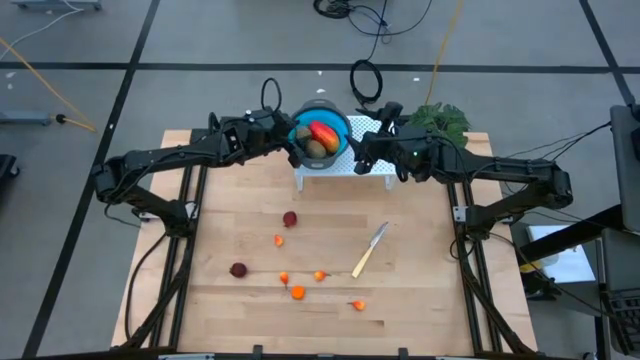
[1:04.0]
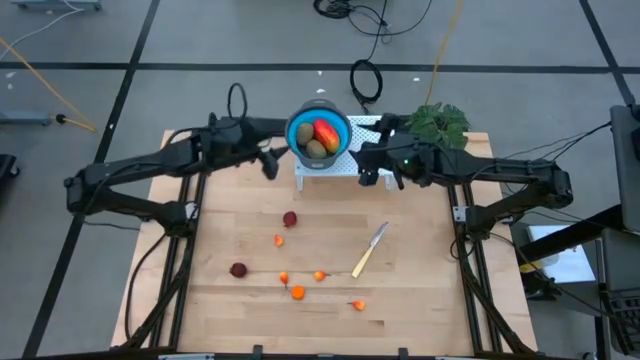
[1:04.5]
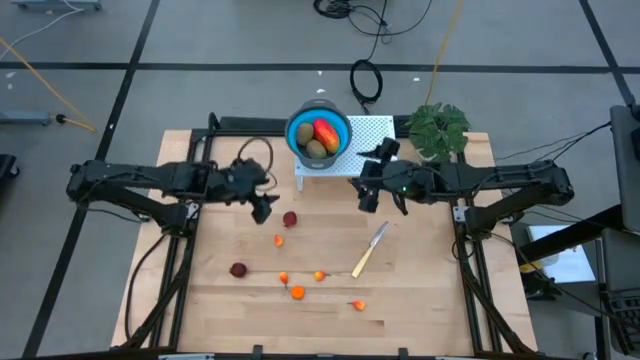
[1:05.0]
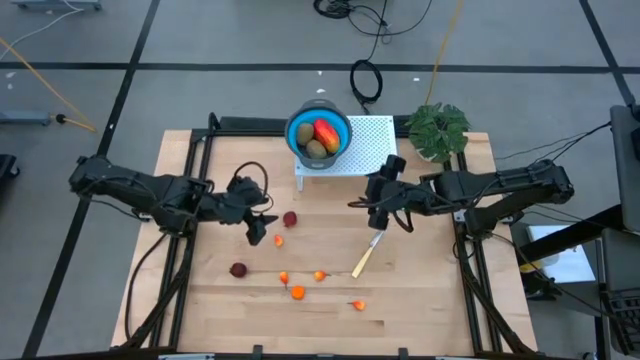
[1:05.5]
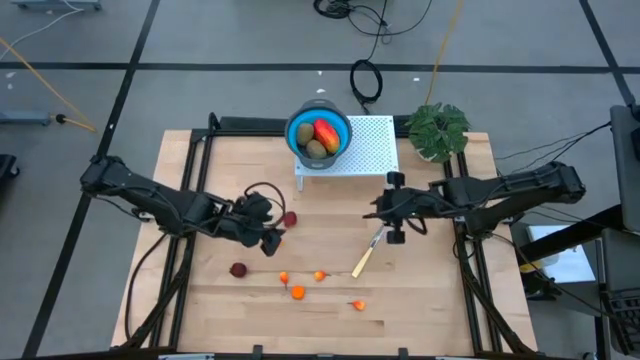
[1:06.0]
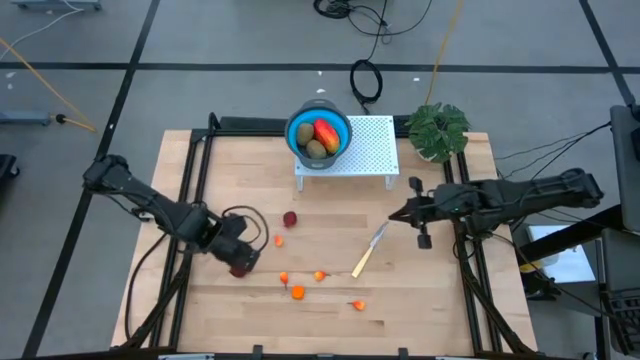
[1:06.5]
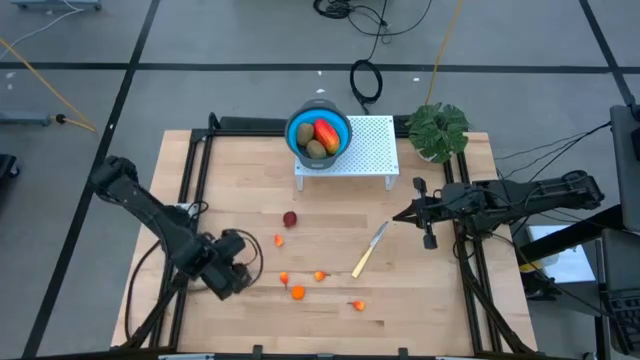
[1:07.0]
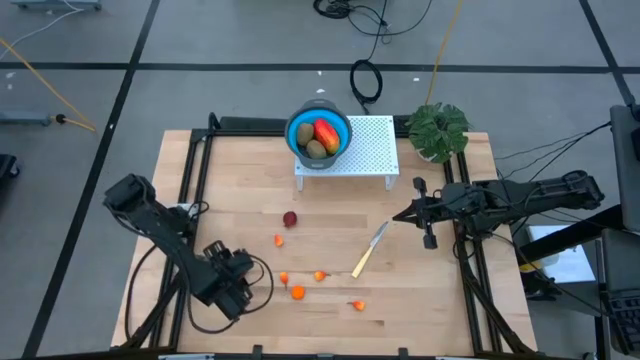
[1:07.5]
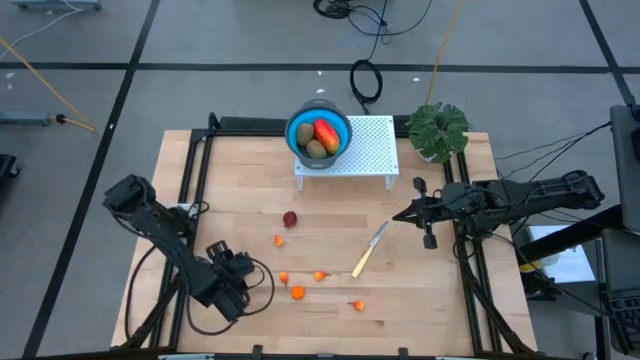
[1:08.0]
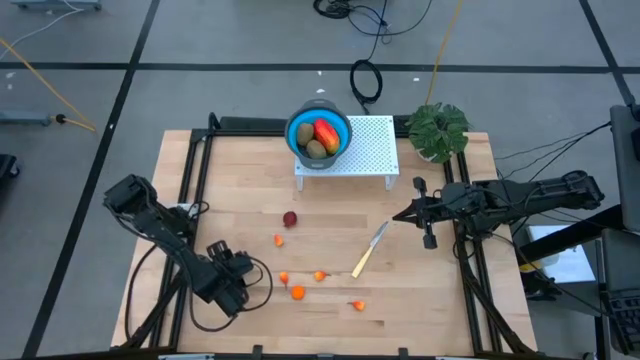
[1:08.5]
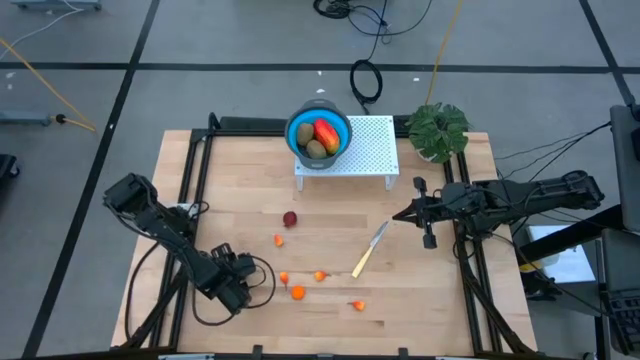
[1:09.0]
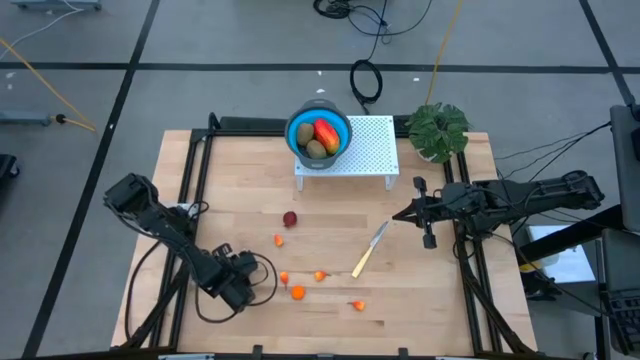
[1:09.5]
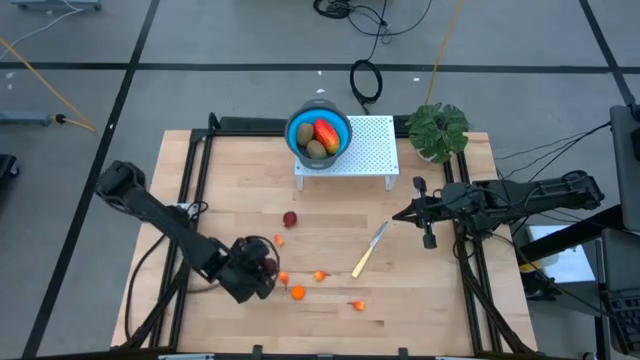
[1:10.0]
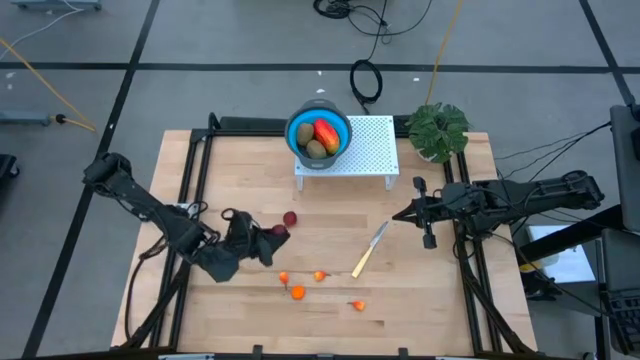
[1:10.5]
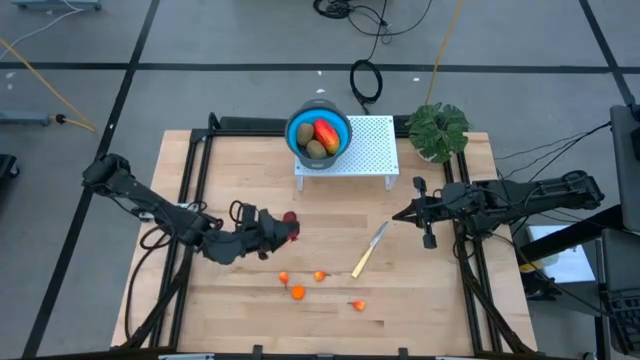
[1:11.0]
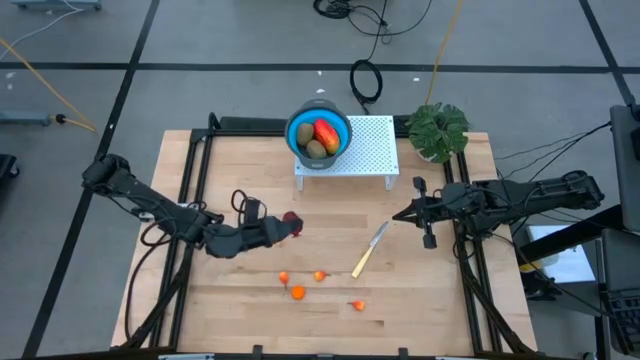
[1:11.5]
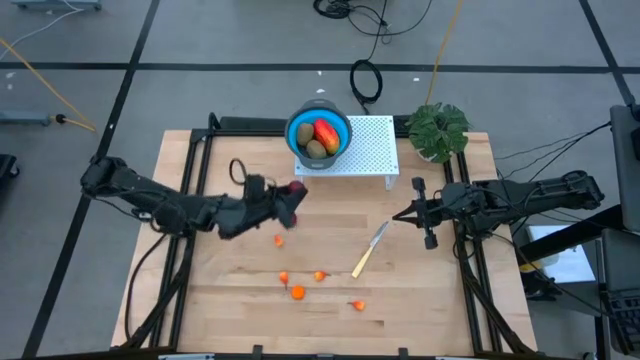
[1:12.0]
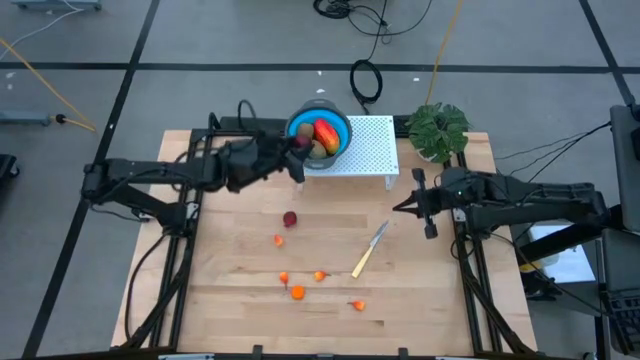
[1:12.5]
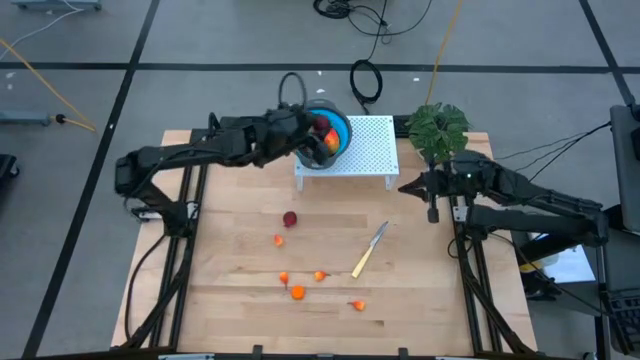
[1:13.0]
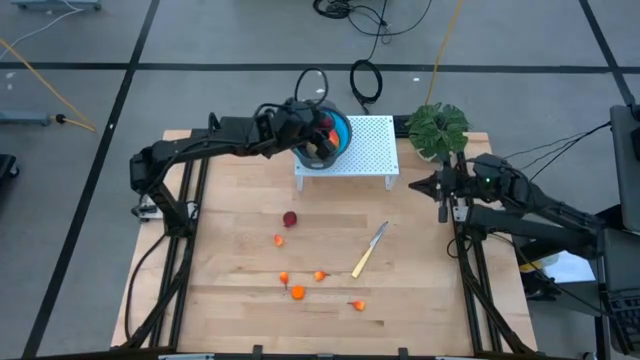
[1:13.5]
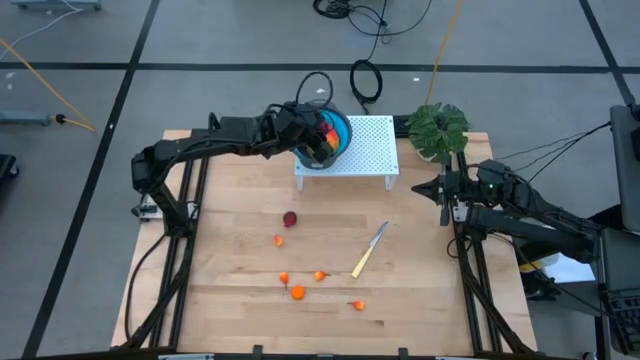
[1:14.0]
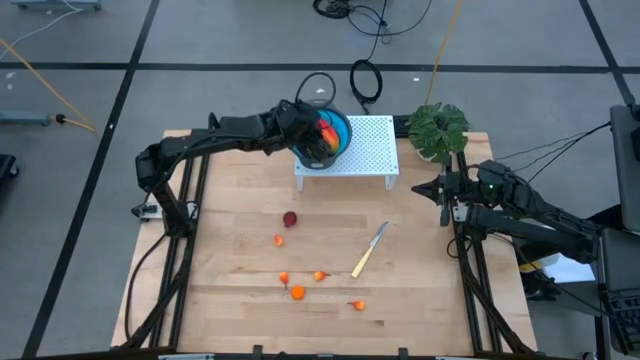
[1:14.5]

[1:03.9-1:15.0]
Task: Pick & Place Fruit
Put the red pomegranate into the blue strainer bowl on the shelf

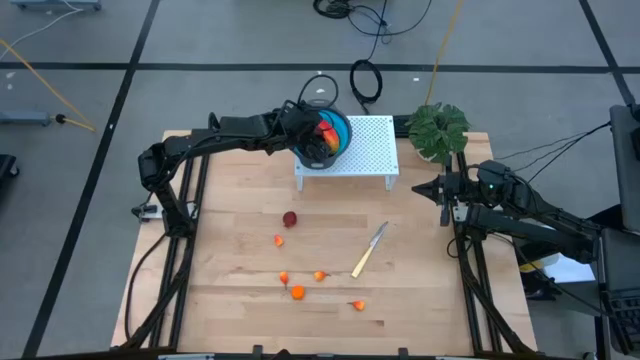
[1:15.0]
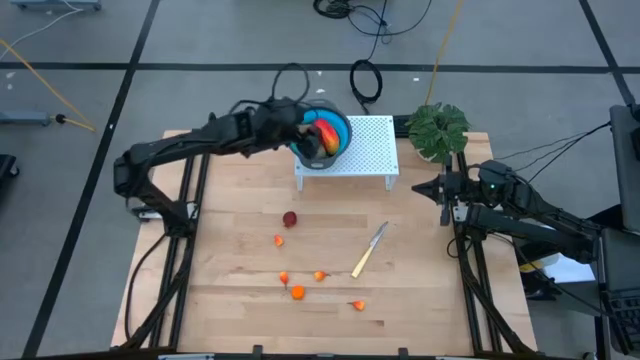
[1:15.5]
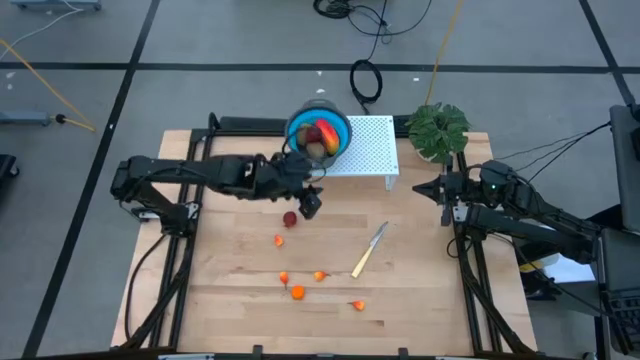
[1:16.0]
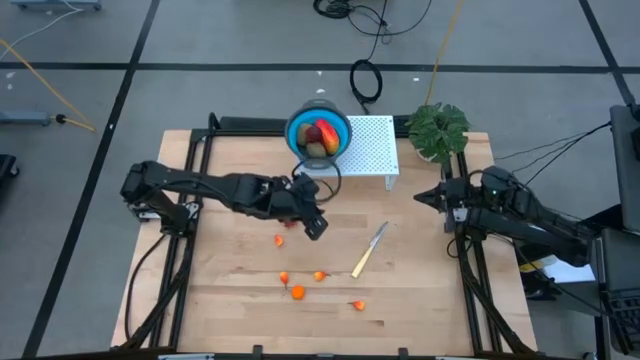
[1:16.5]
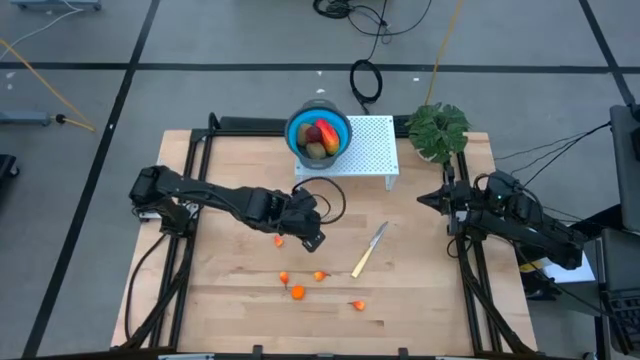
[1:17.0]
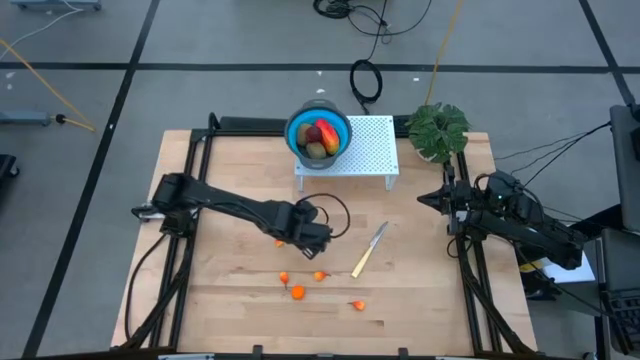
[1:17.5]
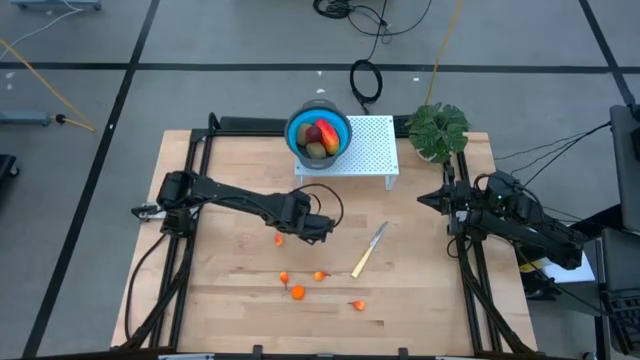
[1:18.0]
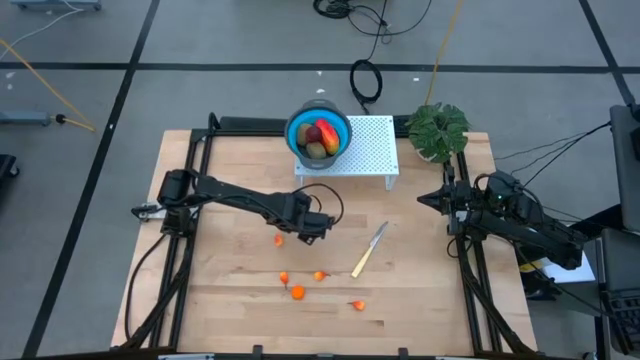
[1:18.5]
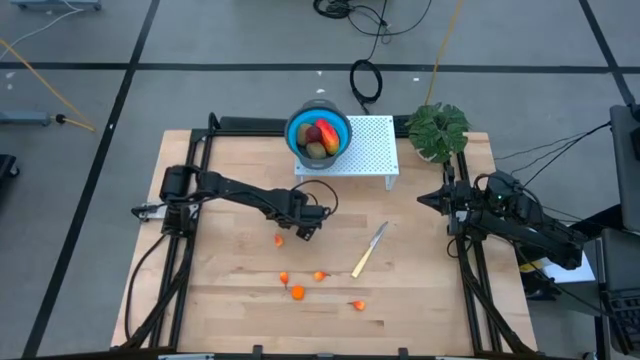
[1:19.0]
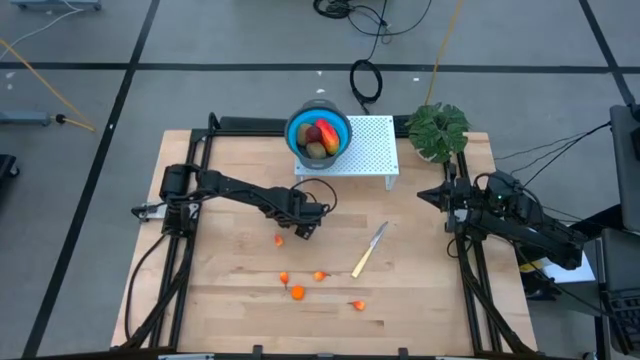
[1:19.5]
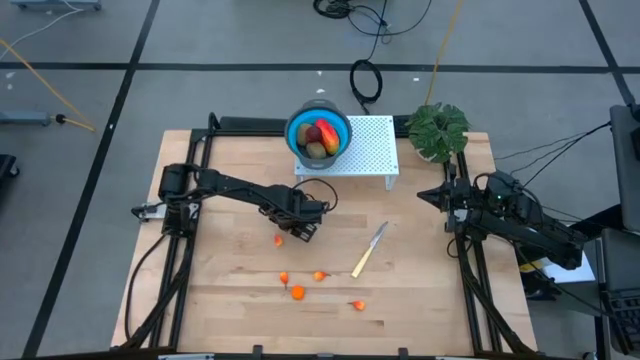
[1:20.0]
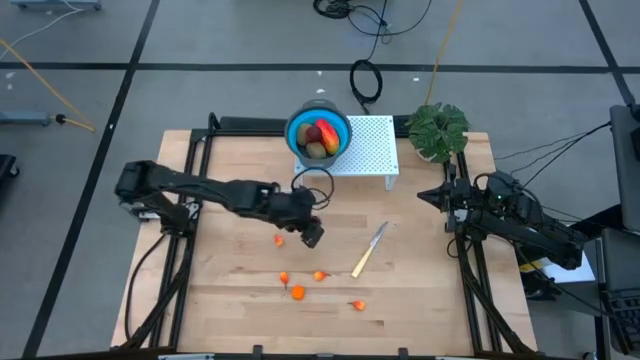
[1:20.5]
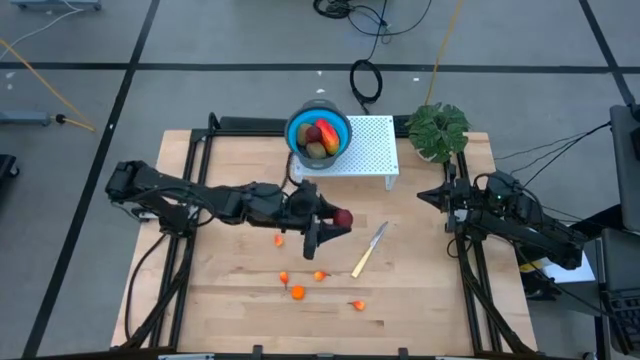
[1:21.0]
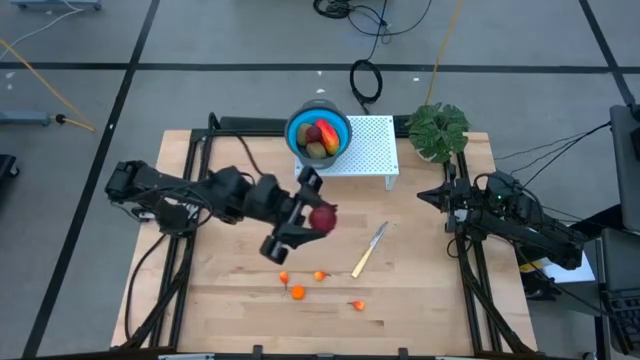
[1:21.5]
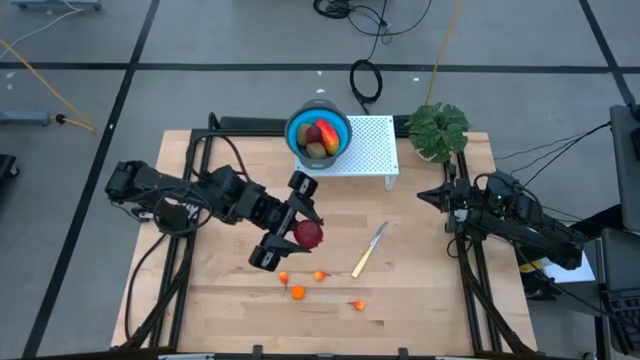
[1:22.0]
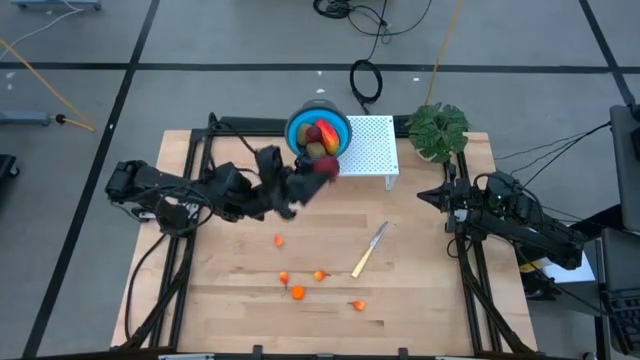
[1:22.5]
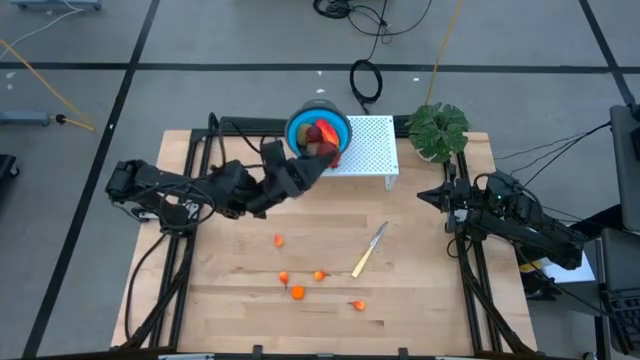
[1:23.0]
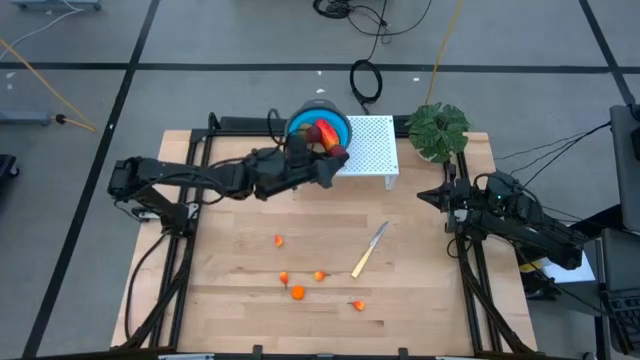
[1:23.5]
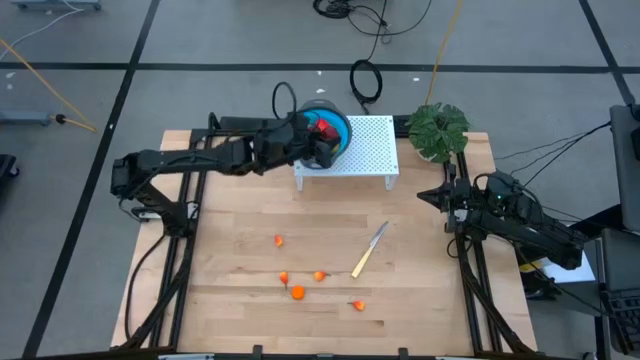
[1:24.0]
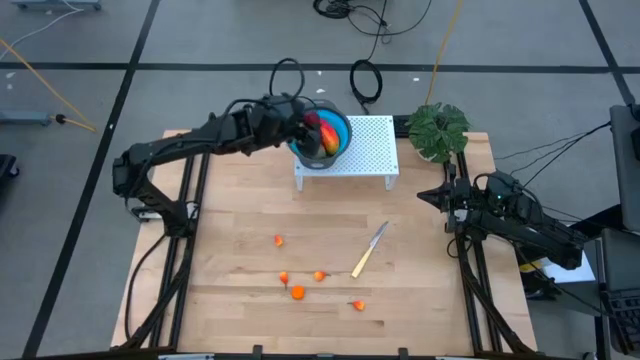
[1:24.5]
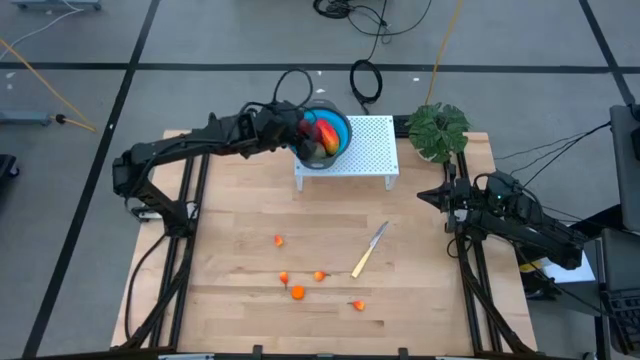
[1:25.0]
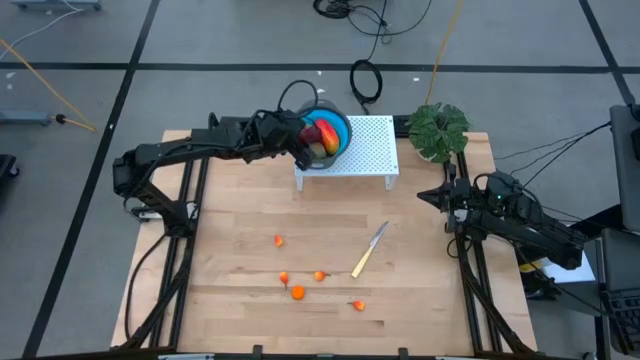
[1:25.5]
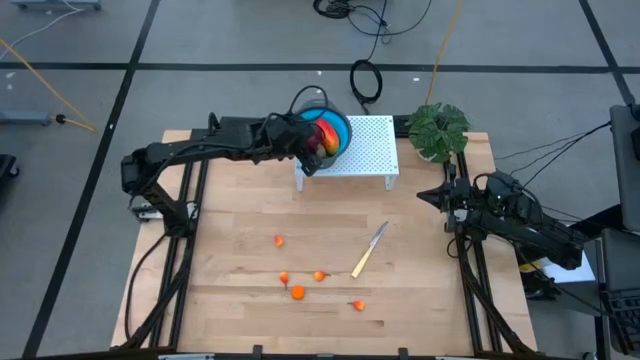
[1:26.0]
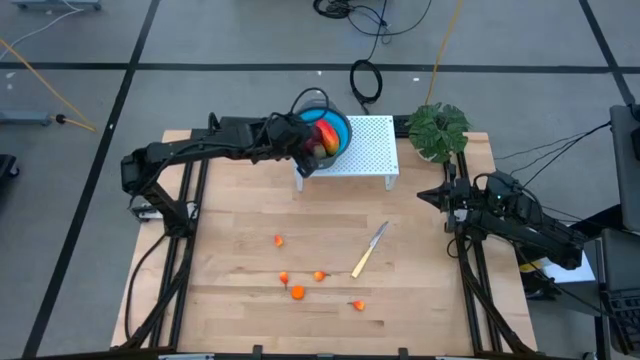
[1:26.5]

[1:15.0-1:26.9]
Put the red pomegranate into the blue strainer bowl on the shelf
